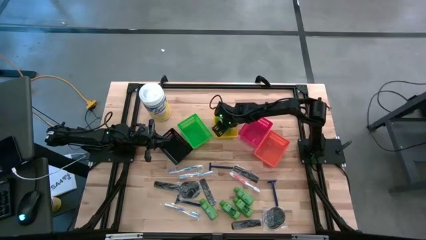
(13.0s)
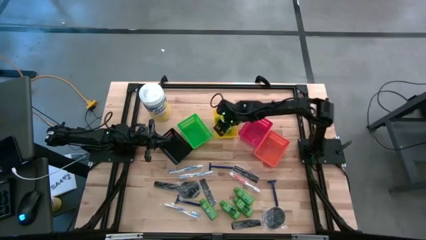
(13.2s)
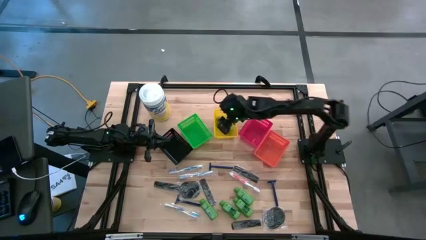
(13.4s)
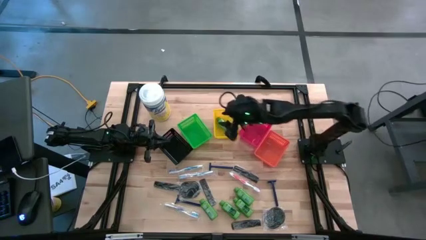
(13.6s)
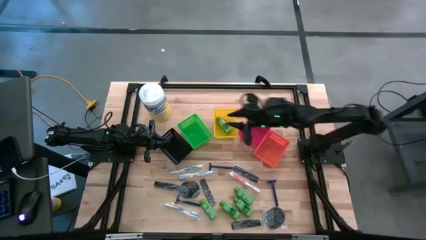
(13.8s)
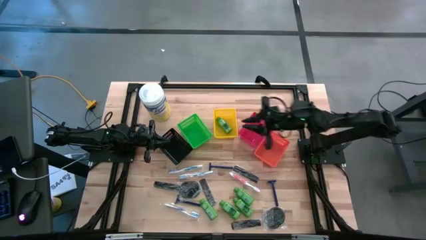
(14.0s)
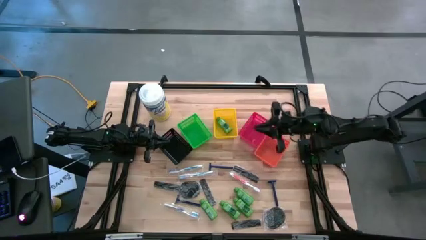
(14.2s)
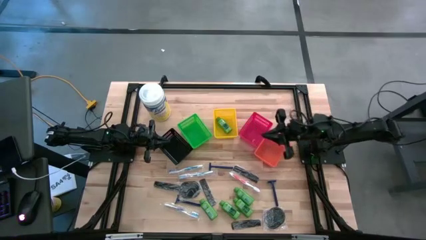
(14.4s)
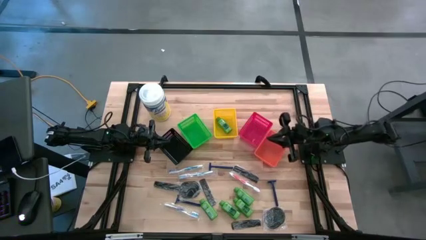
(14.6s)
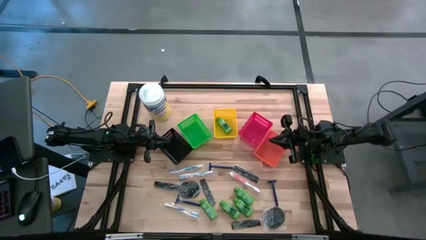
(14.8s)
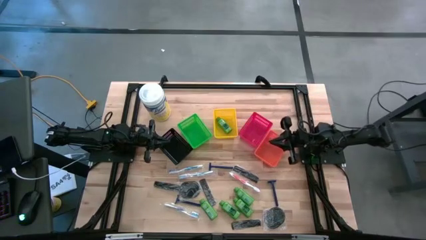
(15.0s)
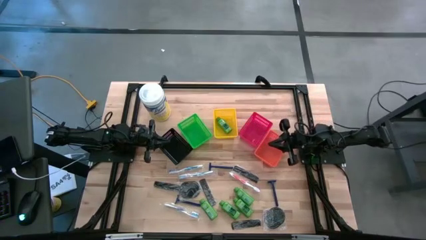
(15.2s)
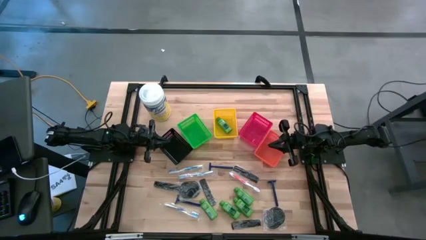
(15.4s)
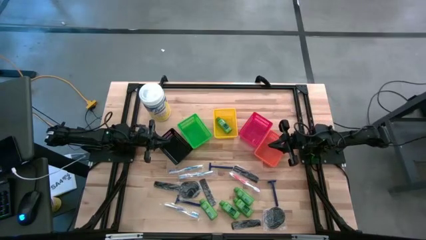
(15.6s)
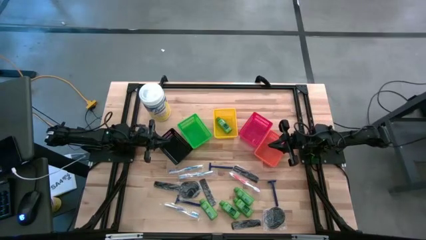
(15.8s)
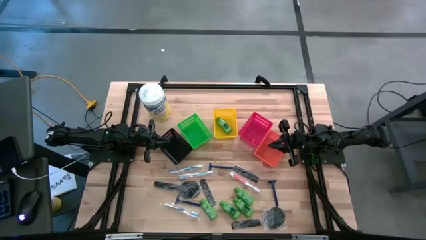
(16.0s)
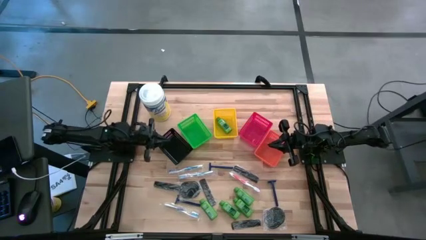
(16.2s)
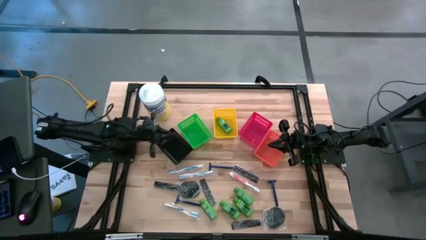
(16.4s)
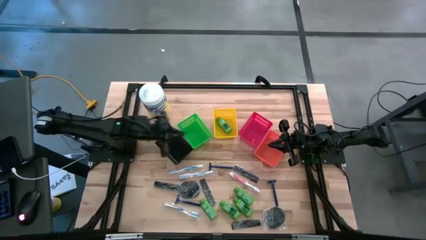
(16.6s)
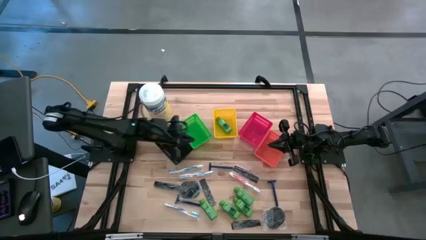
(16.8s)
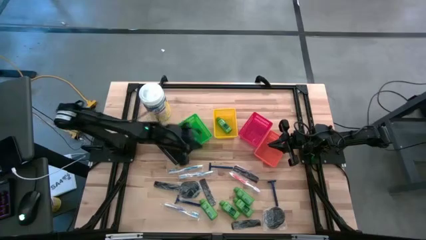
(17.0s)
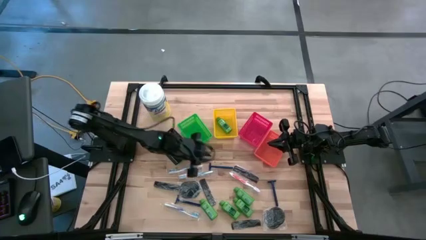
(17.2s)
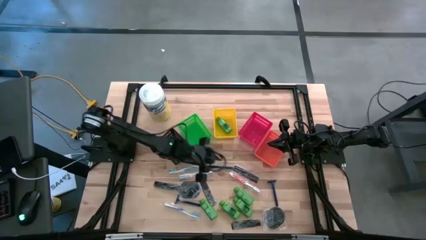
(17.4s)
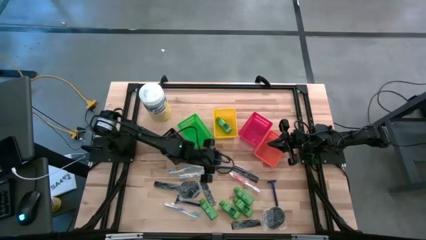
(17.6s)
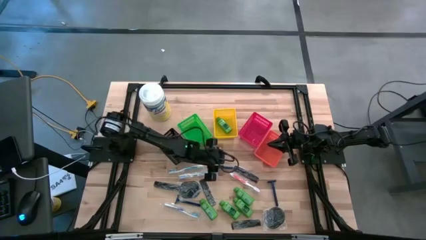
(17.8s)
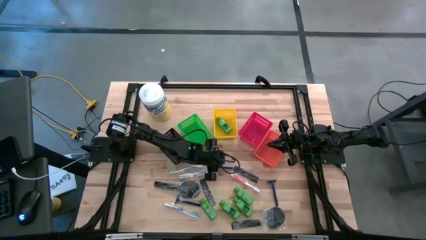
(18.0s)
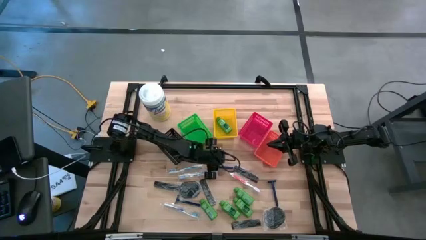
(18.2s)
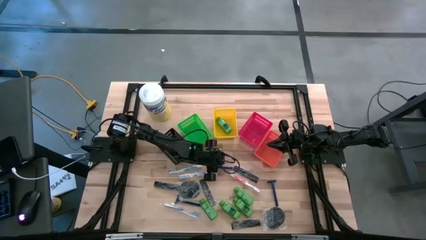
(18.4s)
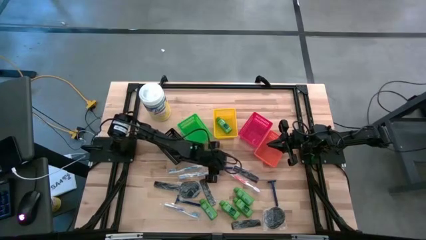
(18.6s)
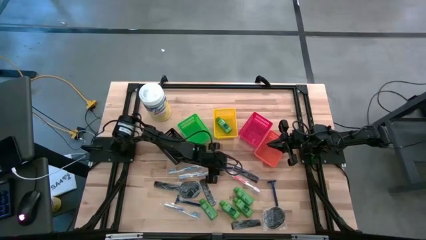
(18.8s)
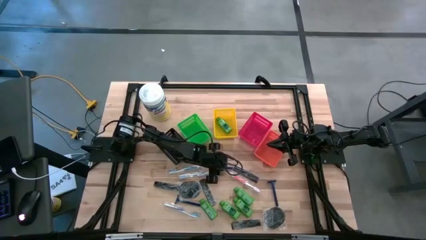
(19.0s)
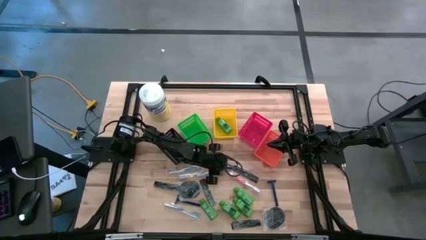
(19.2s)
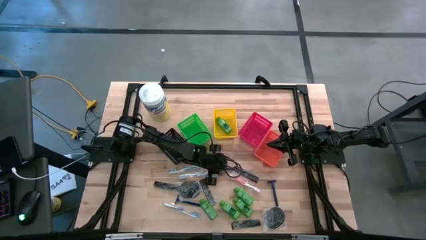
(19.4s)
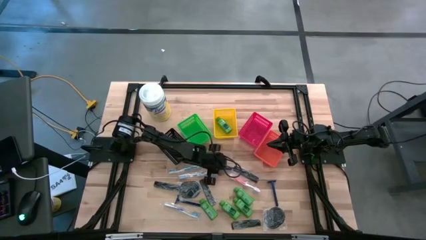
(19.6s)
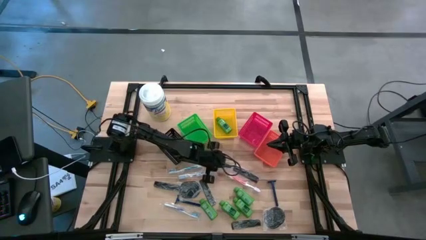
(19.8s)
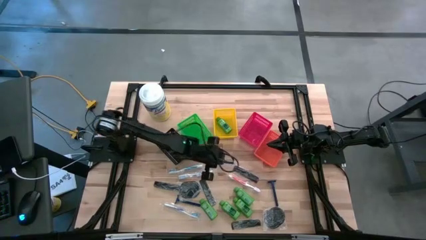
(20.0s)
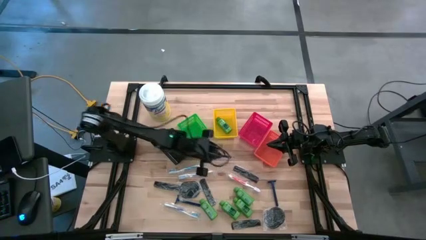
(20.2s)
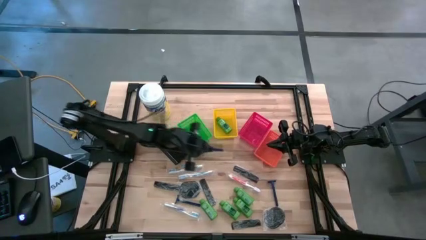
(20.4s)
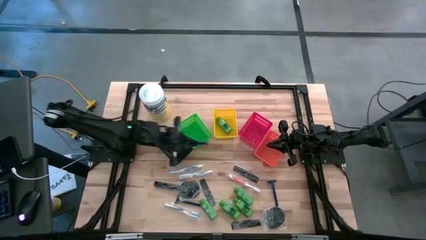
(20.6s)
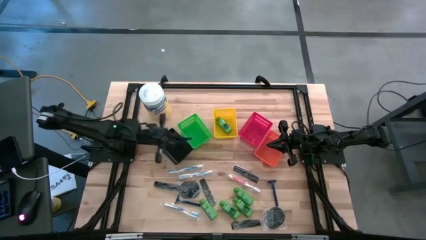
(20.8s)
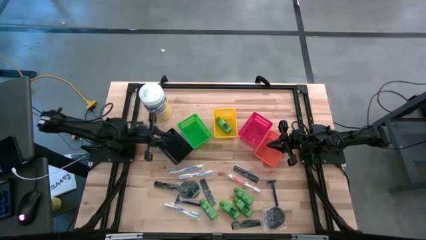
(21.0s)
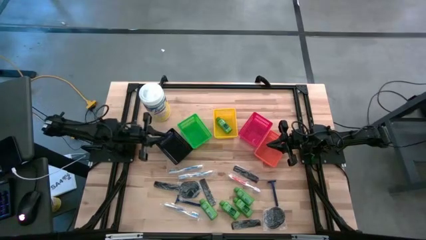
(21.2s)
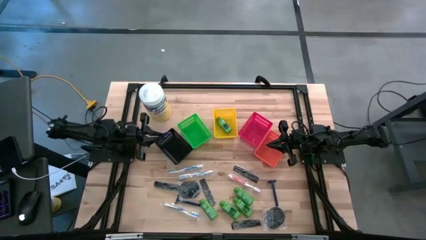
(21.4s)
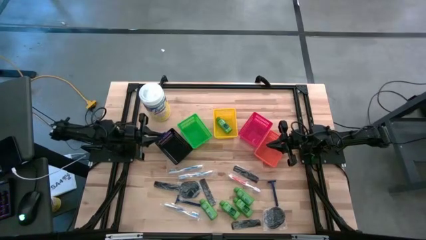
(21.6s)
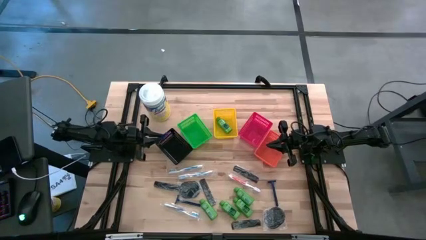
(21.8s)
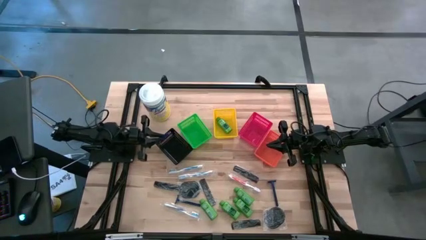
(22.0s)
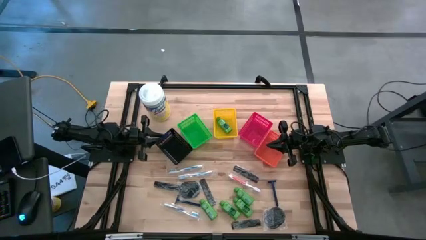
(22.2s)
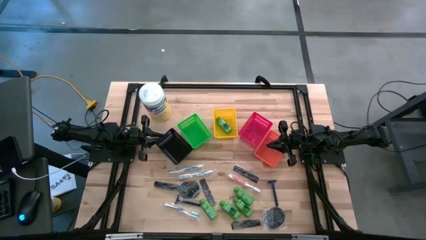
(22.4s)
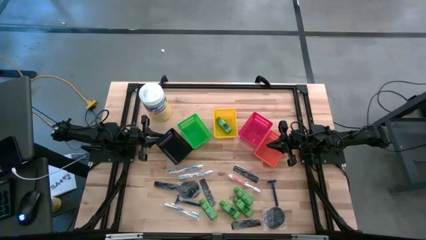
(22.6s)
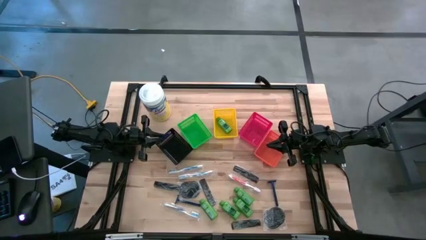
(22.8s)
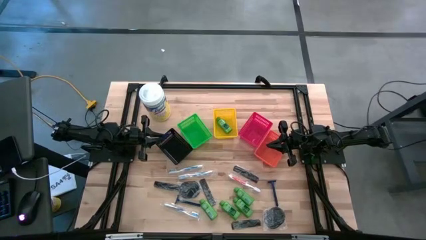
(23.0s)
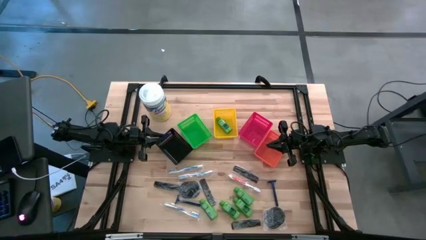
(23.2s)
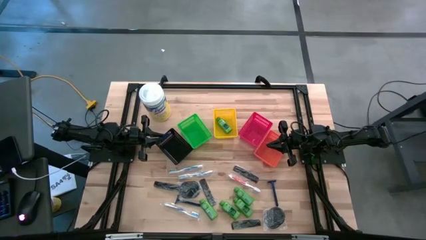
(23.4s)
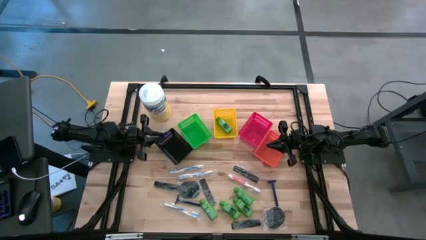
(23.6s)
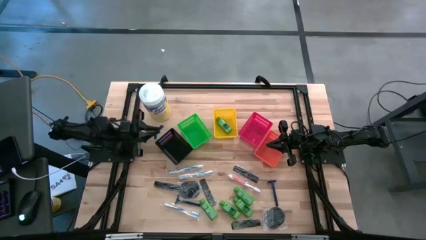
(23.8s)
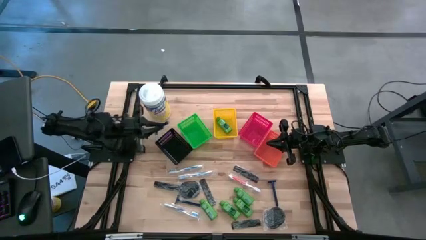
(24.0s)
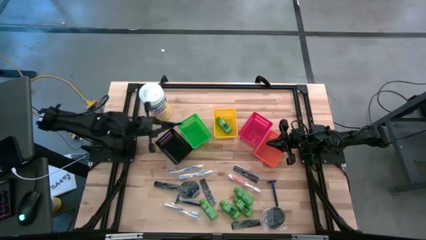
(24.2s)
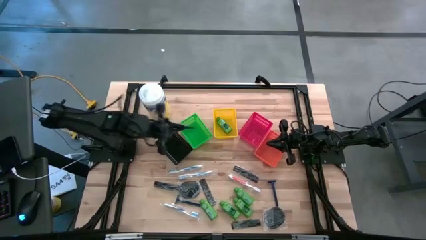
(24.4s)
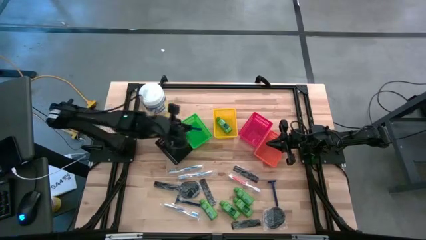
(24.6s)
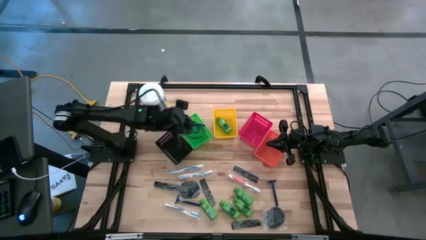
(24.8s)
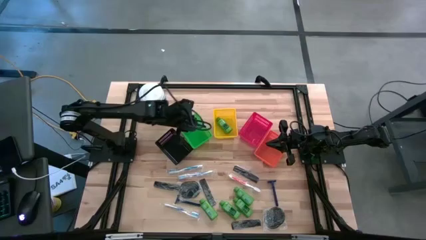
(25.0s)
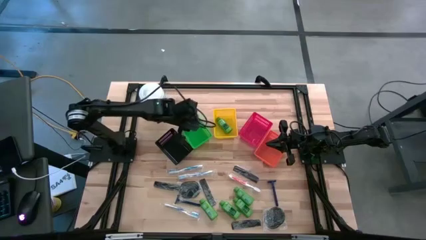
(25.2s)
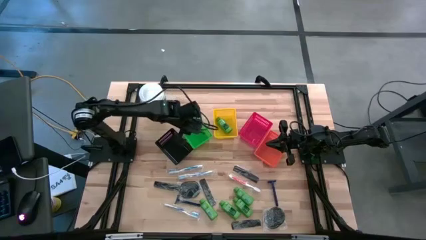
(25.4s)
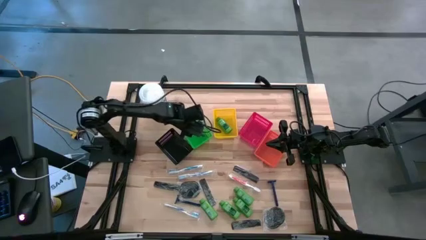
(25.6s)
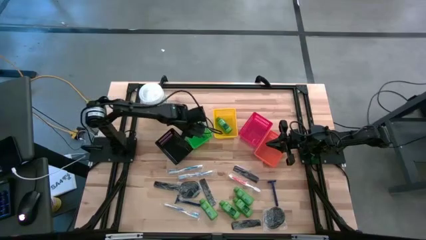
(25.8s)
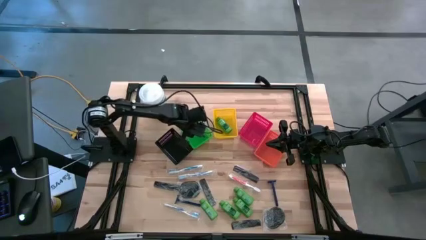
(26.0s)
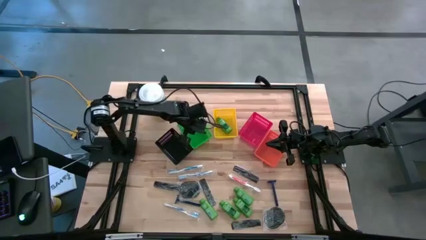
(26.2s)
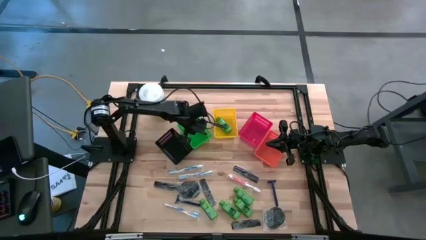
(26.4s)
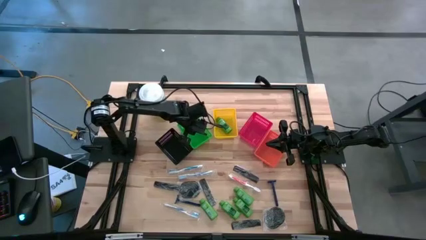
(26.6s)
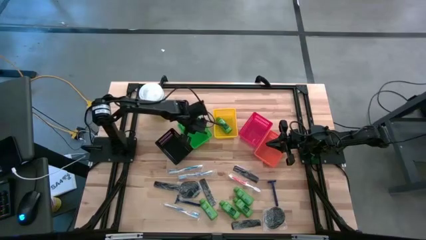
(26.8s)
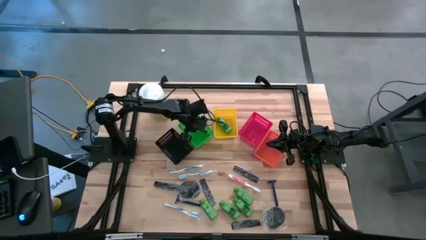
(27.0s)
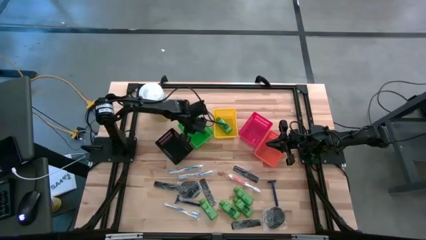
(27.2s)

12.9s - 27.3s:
Task: Pick & Place Travel size toiletries
Put the middle blue shaver into the green bin
